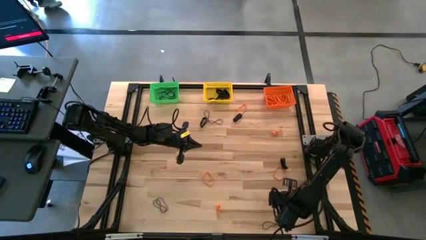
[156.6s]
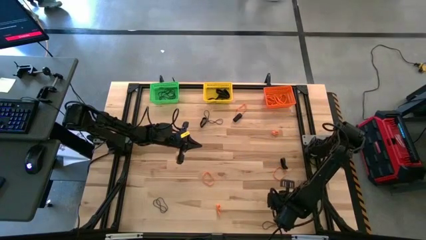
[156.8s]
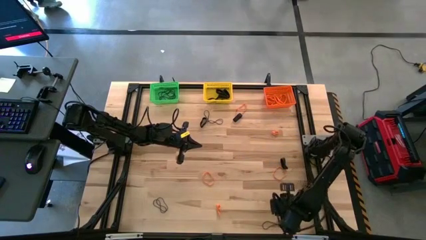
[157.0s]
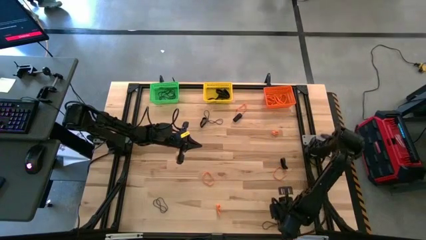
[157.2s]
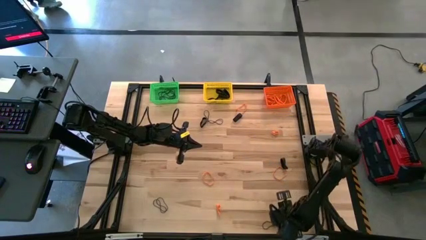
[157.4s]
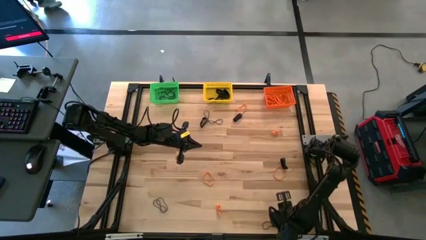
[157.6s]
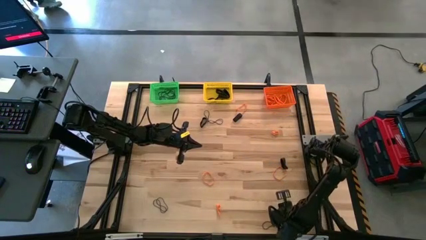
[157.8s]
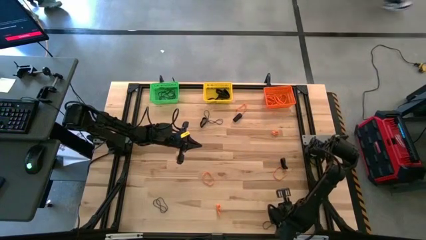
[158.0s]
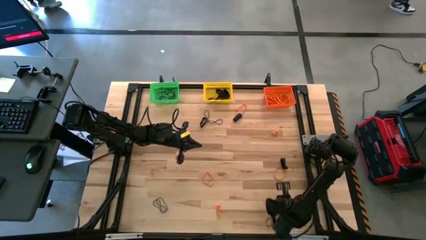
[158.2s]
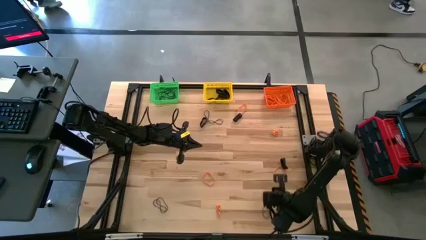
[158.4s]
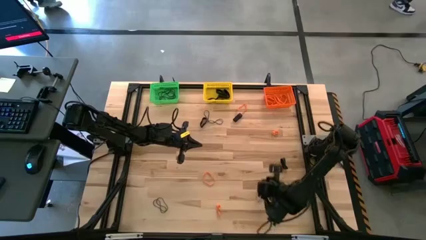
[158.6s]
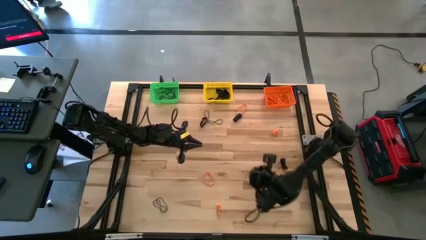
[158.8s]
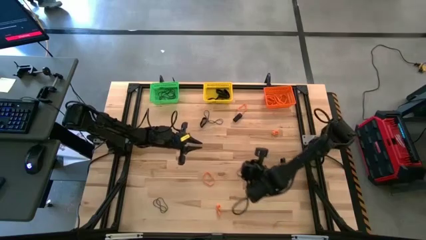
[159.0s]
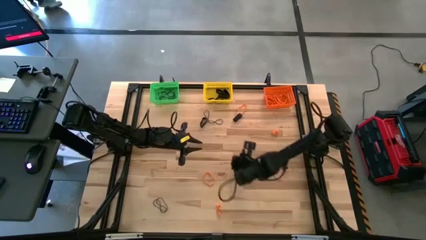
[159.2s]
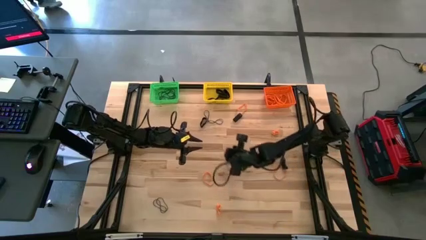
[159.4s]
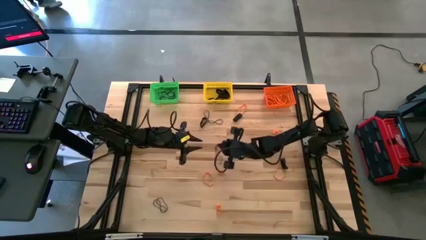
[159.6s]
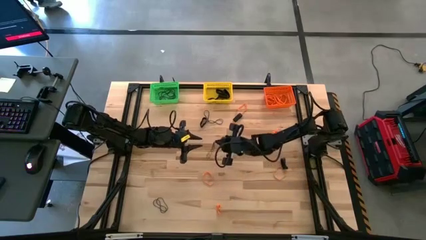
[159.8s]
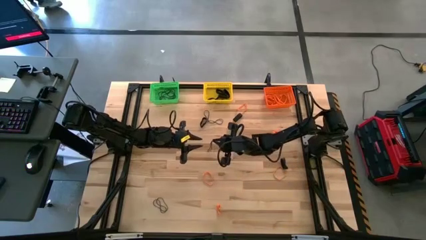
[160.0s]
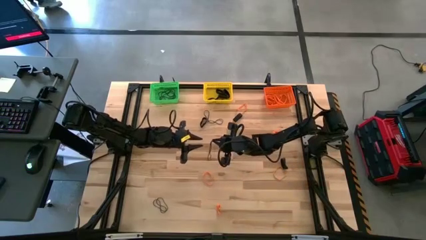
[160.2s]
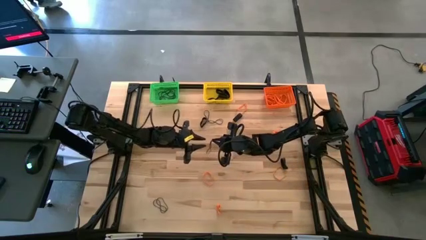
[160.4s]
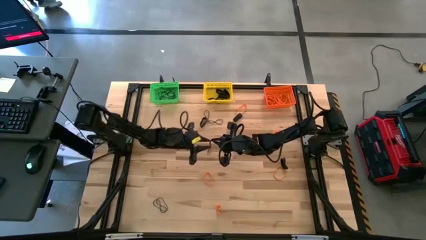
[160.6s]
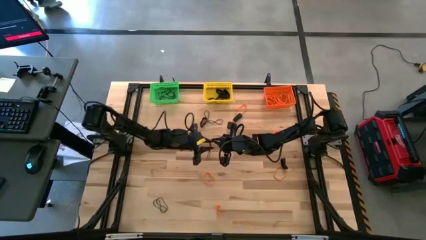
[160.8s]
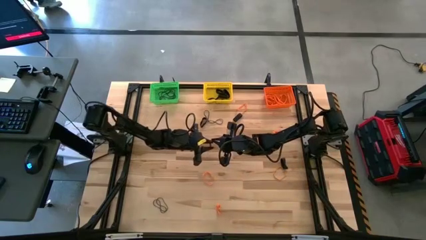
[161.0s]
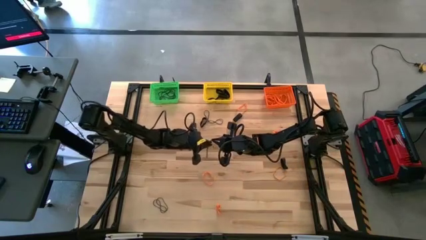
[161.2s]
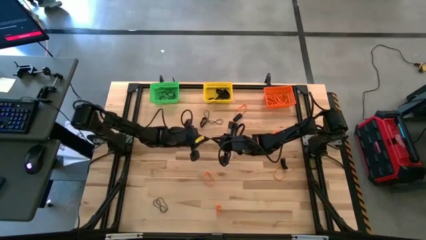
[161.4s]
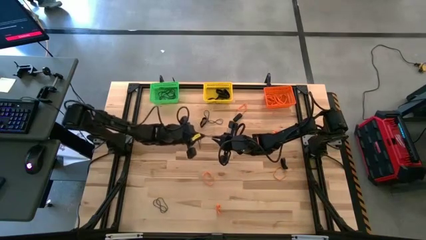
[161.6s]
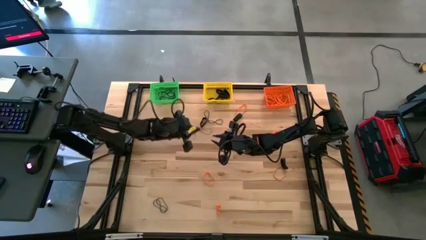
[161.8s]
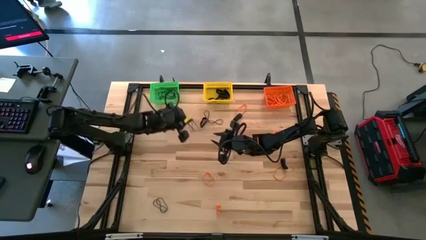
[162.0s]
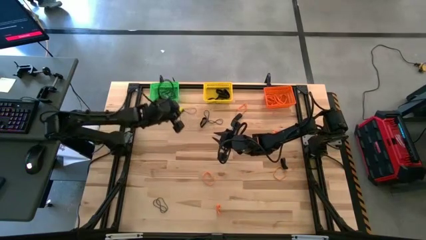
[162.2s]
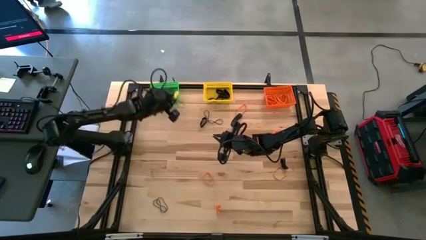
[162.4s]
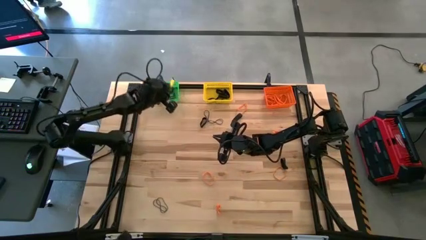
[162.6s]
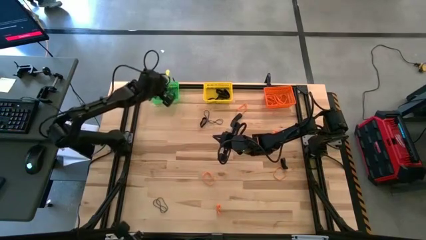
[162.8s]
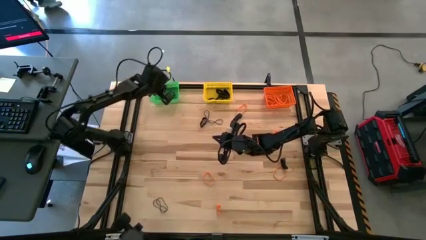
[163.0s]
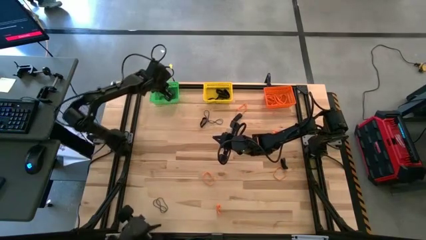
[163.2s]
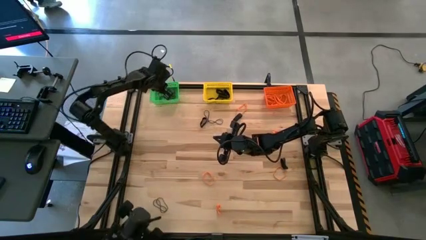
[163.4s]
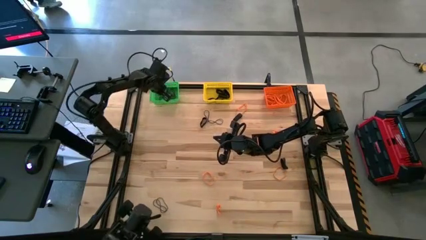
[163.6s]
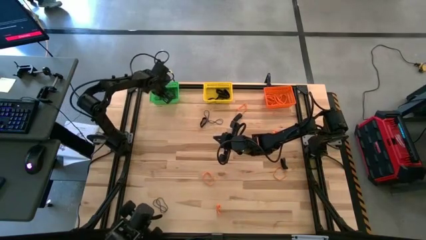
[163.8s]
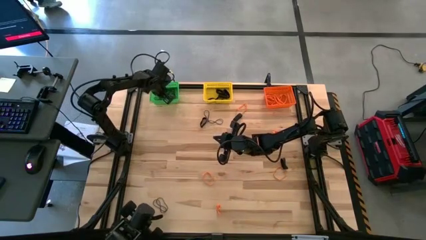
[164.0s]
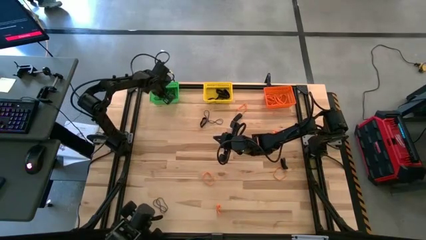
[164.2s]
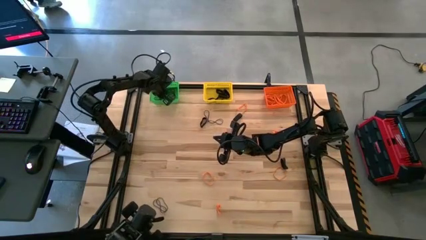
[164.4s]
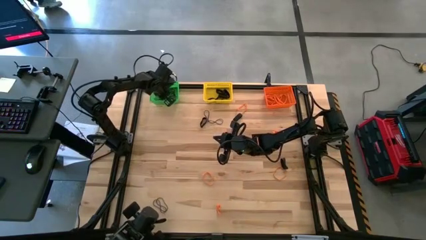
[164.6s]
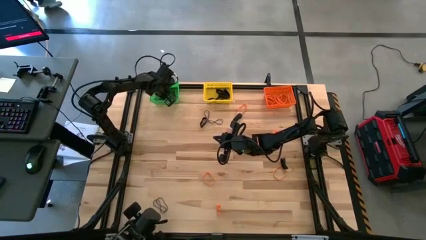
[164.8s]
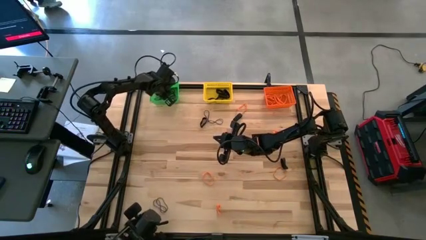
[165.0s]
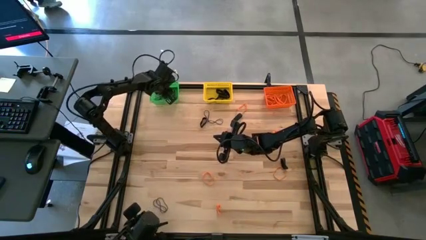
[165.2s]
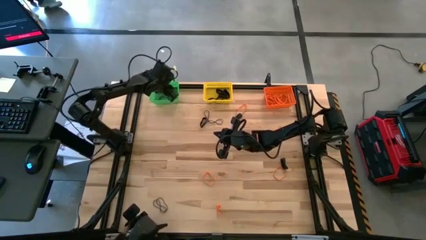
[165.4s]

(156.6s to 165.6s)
Task: Sort rubber bands into baskets
Put the purple rubber band into the green bin

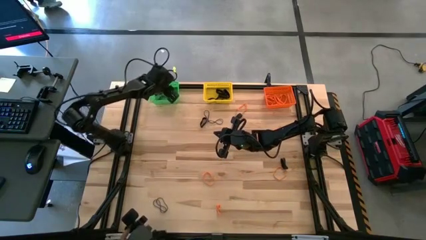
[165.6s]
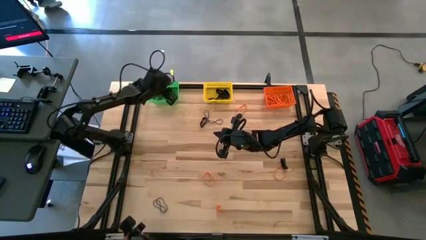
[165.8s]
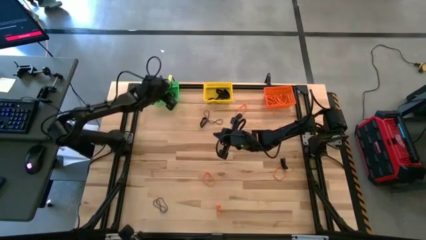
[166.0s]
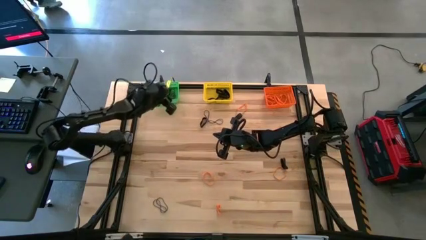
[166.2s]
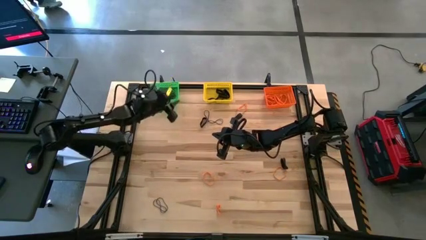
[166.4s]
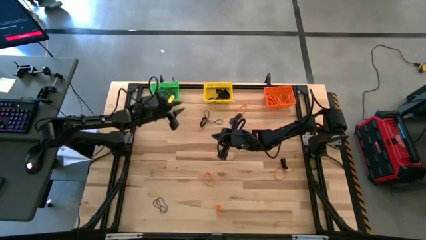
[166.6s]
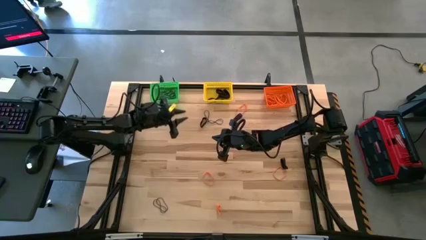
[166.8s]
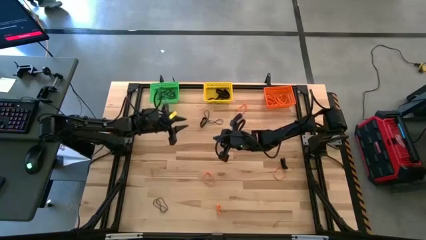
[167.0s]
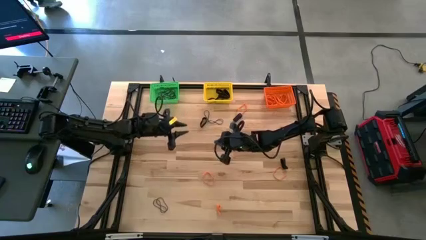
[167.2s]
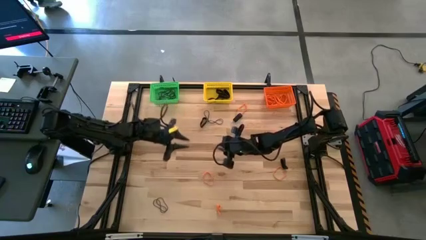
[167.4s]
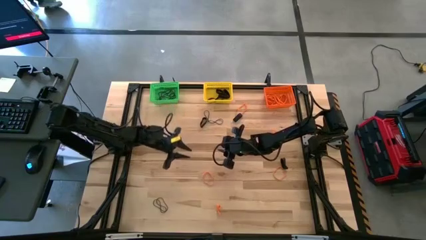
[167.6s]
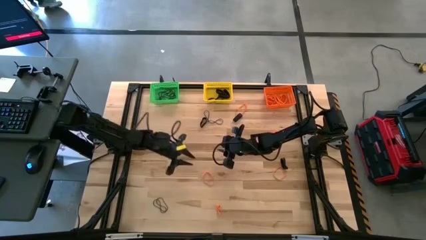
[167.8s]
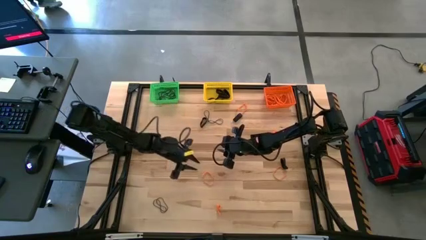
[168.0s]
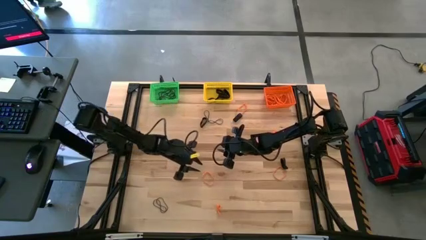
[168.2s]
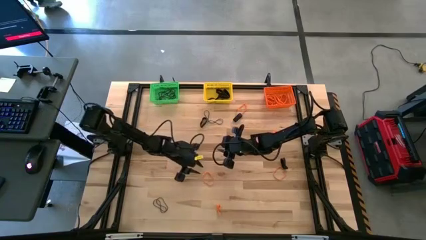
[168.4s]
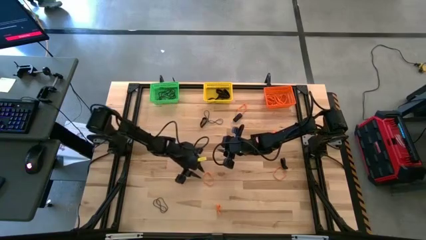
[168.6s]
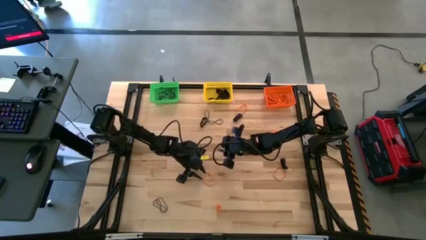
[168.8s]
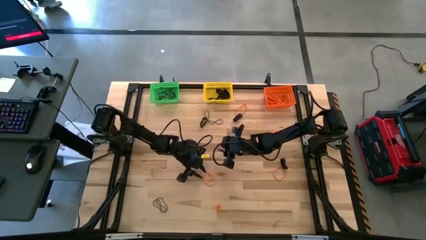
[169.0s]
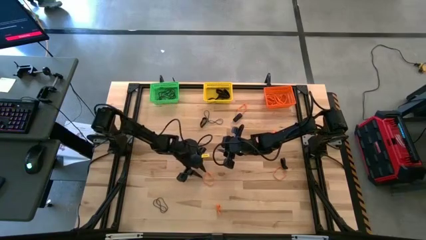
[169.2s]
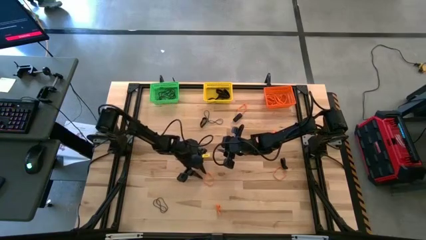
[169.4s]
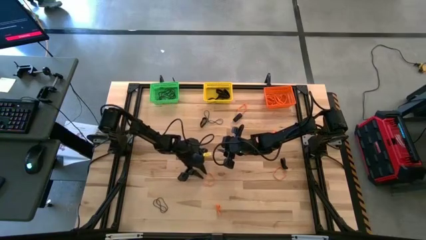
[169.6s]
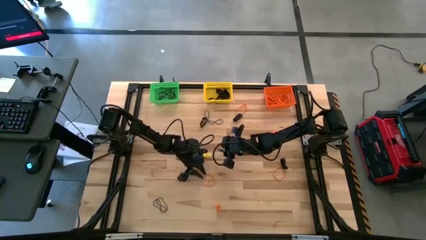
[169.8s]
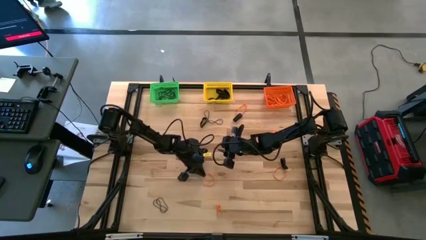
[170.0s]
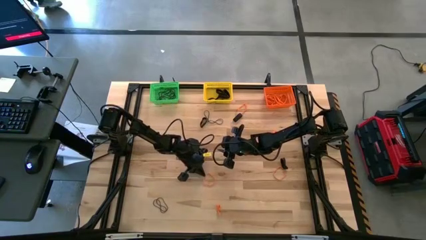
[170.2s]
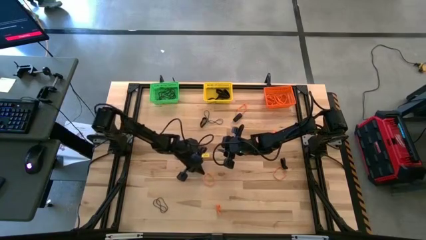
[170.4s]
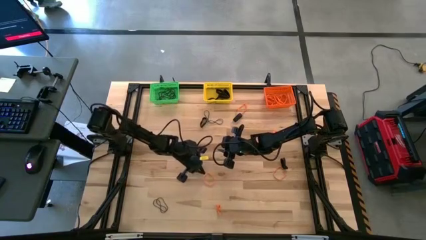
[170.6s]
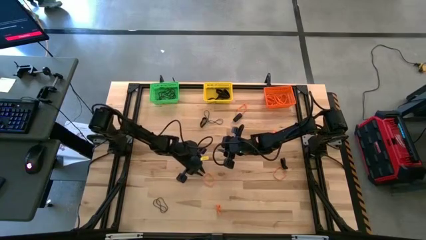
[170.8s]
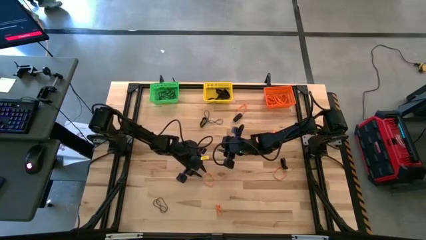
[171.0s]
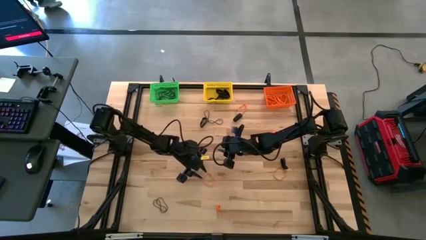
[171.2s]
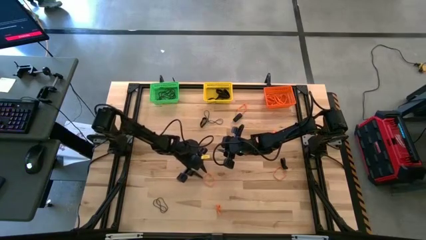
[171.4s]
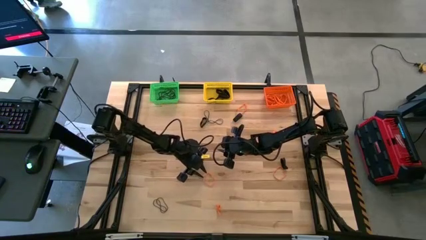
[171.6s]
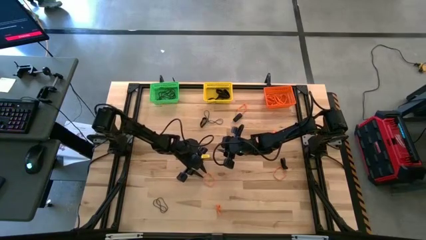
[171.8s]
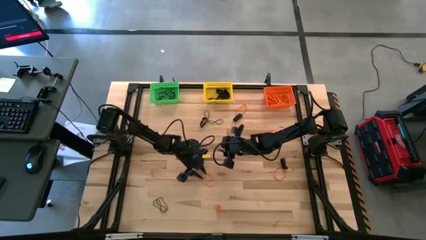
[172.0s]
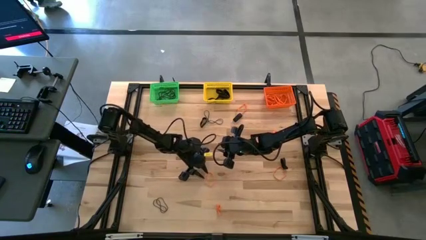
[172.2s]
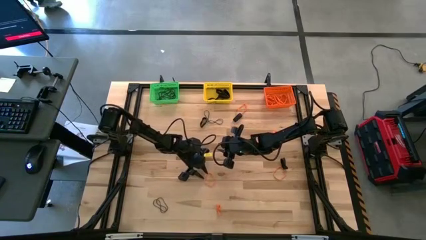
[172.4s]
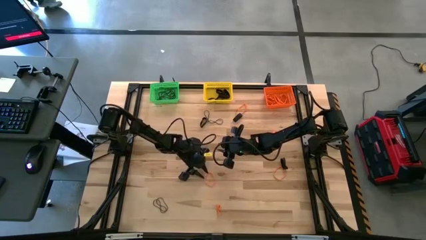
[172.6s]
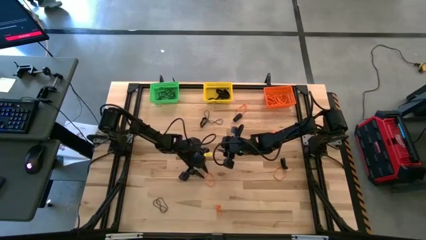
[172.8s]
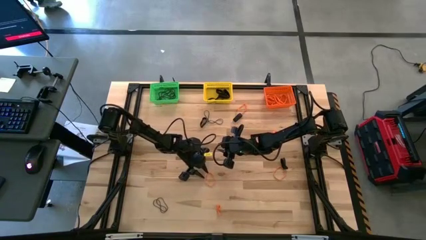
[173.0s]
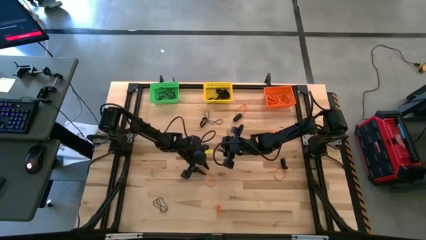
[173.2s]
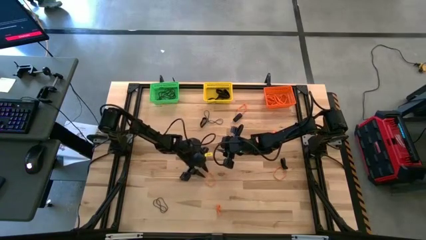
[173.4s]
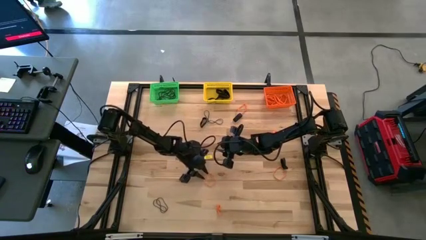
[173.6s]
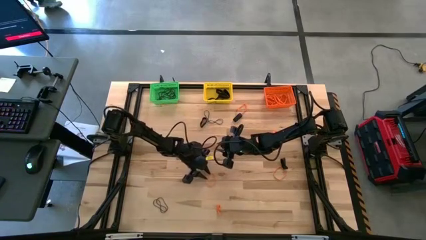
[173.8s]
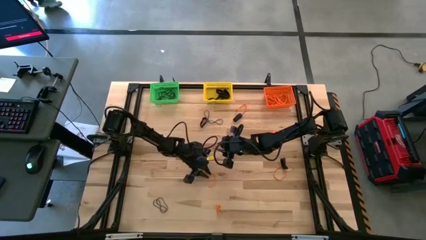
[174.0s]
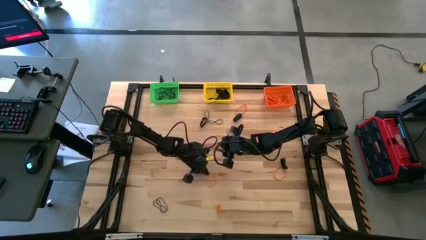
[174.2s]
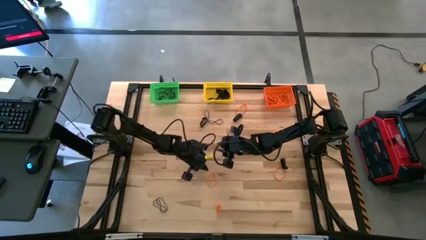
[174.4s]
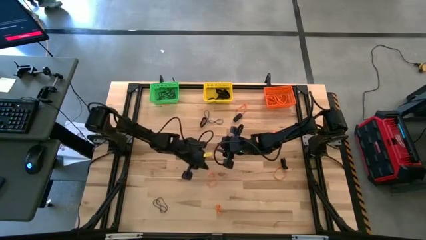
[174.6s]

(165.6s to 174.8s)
Put the orange rubber band into the orange bin
